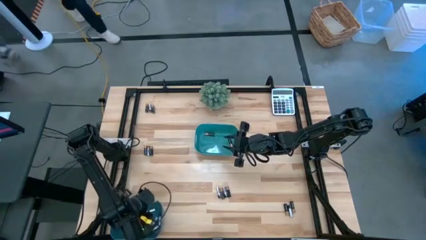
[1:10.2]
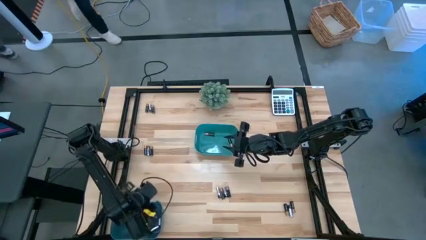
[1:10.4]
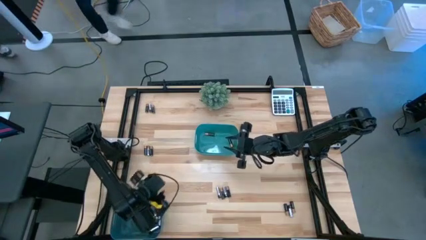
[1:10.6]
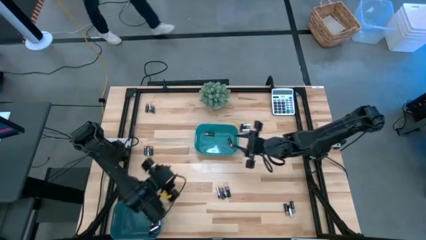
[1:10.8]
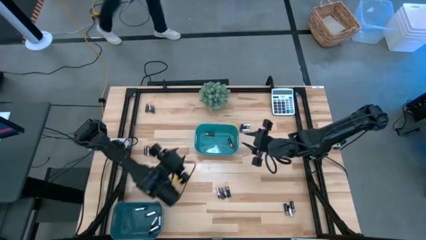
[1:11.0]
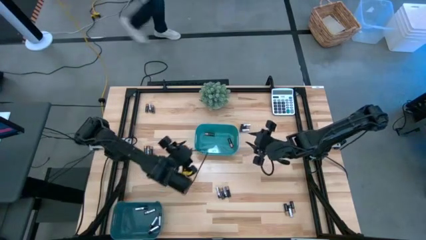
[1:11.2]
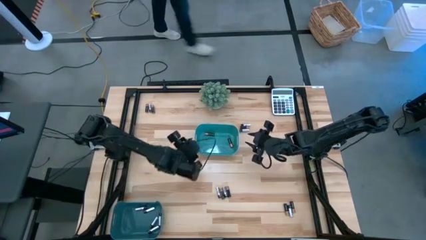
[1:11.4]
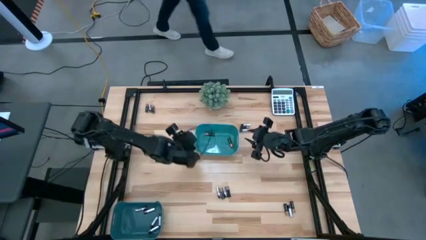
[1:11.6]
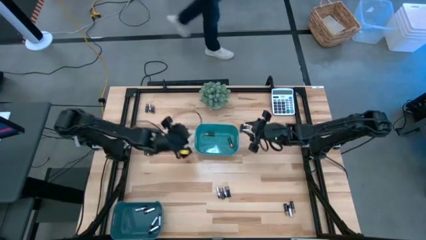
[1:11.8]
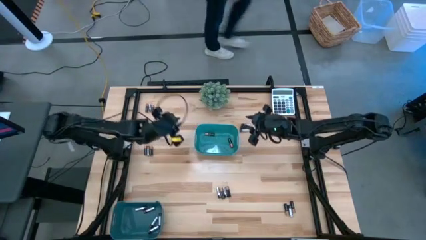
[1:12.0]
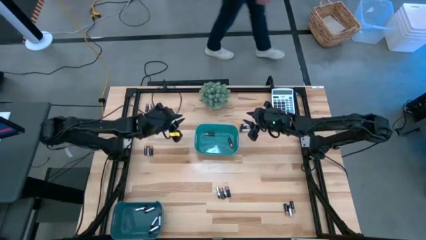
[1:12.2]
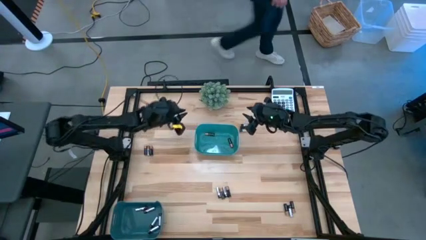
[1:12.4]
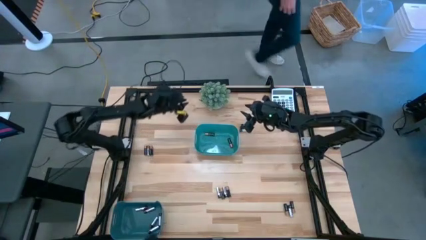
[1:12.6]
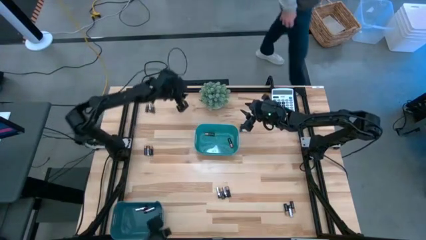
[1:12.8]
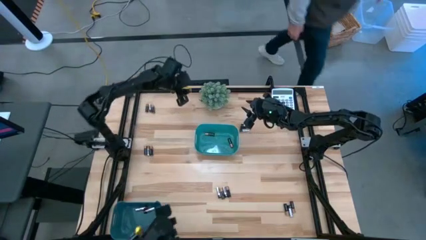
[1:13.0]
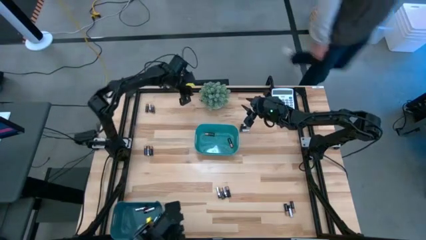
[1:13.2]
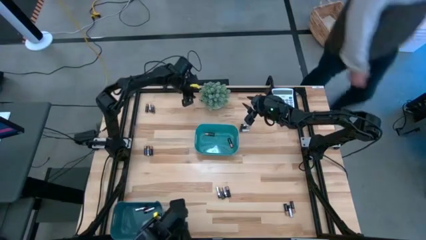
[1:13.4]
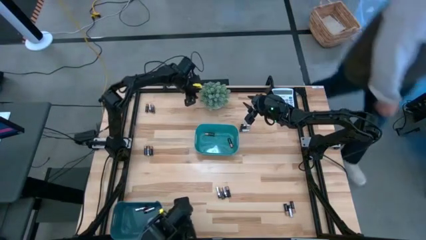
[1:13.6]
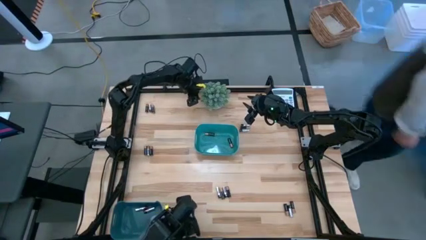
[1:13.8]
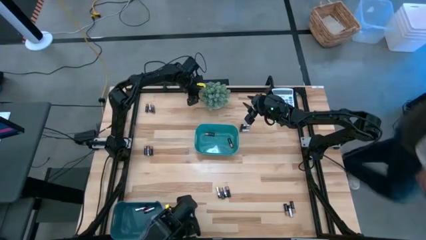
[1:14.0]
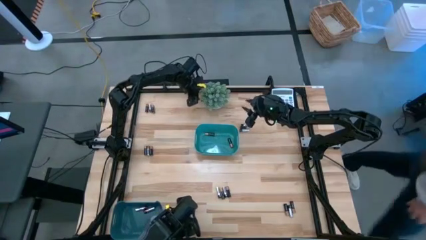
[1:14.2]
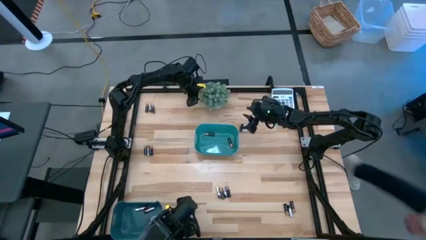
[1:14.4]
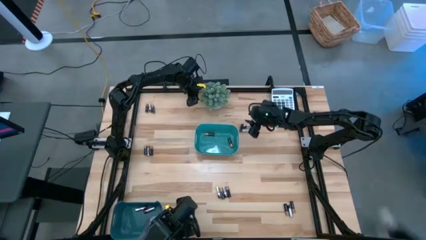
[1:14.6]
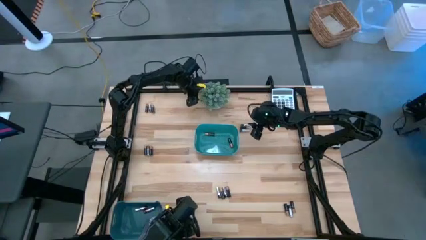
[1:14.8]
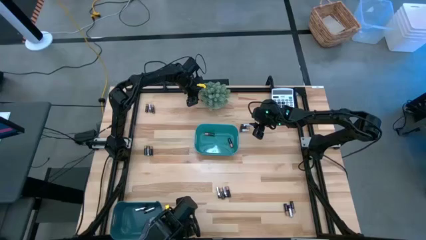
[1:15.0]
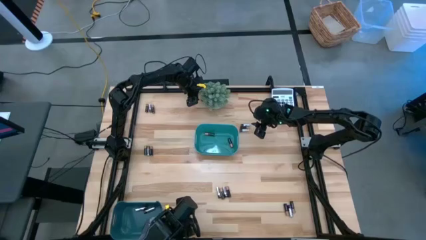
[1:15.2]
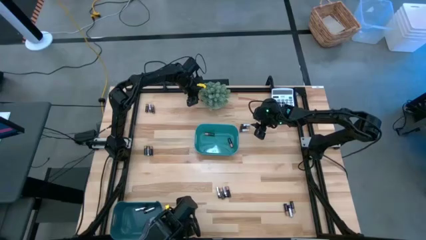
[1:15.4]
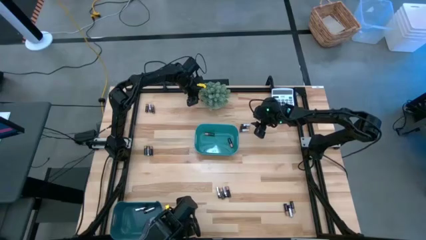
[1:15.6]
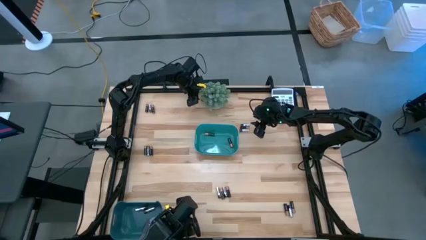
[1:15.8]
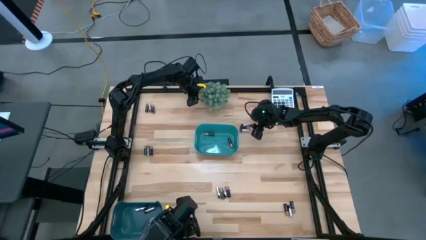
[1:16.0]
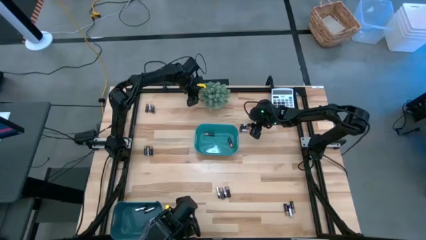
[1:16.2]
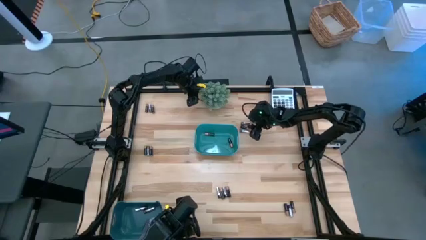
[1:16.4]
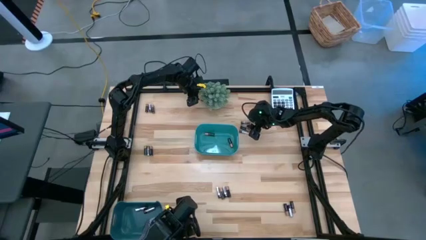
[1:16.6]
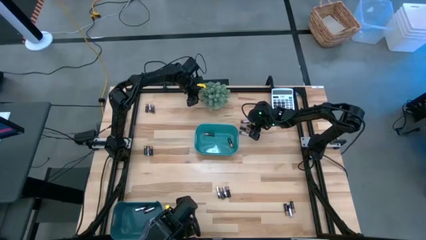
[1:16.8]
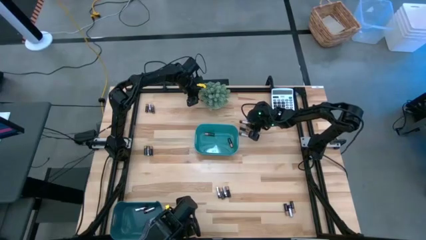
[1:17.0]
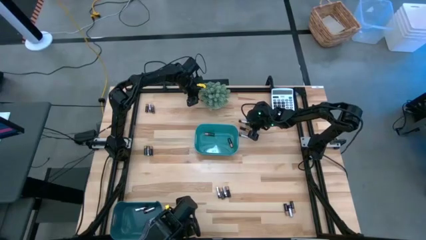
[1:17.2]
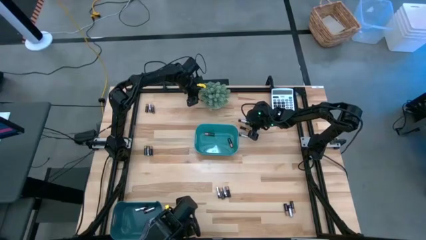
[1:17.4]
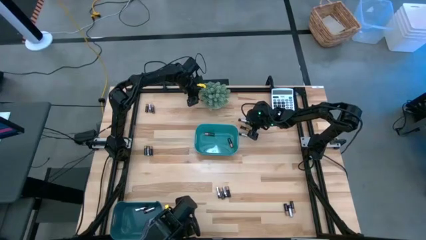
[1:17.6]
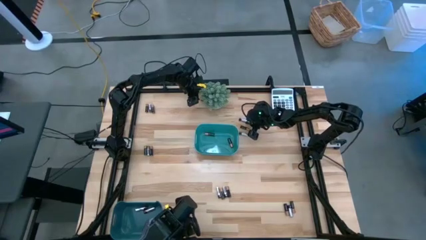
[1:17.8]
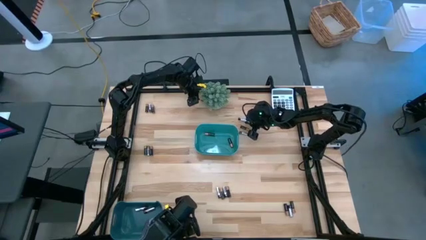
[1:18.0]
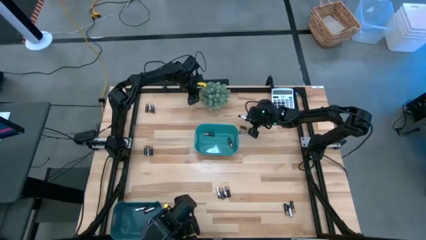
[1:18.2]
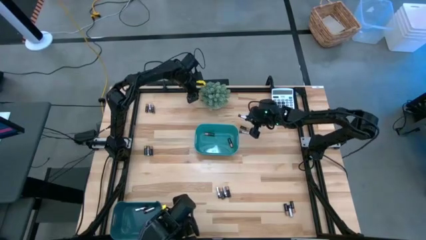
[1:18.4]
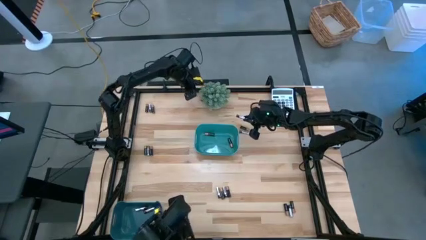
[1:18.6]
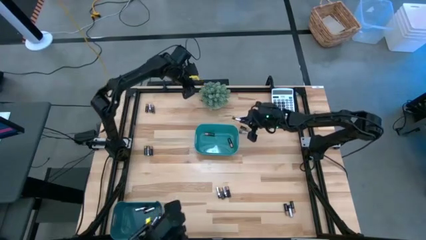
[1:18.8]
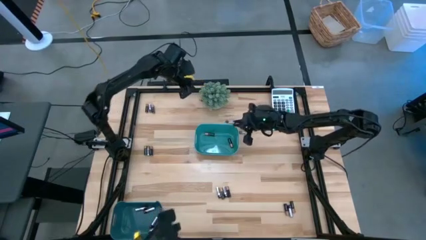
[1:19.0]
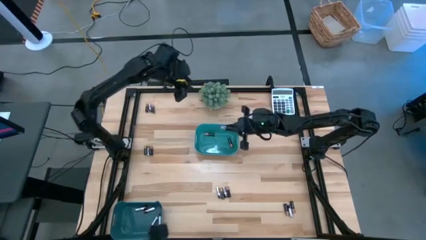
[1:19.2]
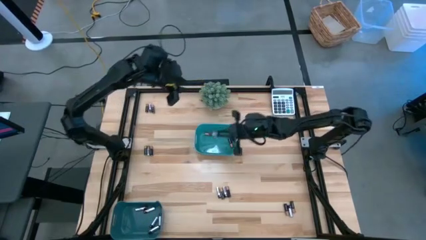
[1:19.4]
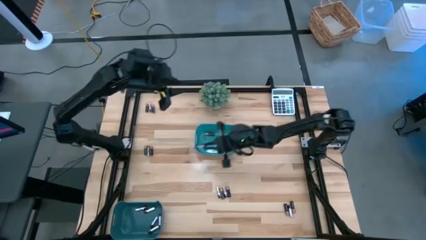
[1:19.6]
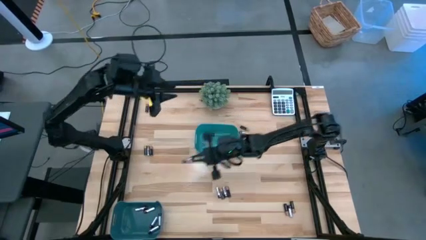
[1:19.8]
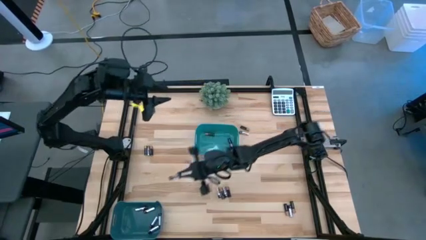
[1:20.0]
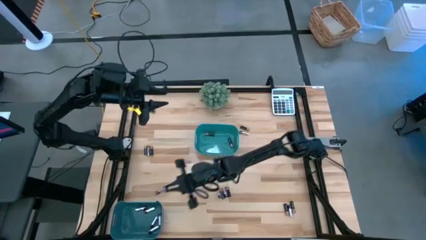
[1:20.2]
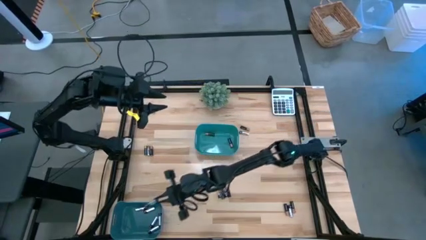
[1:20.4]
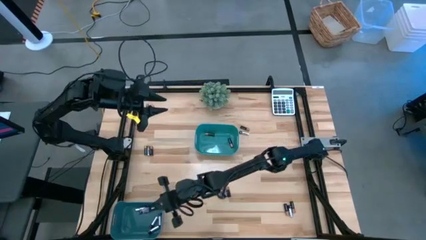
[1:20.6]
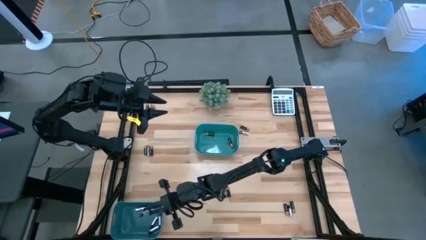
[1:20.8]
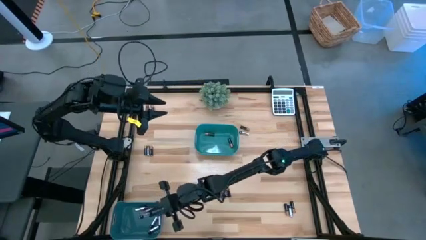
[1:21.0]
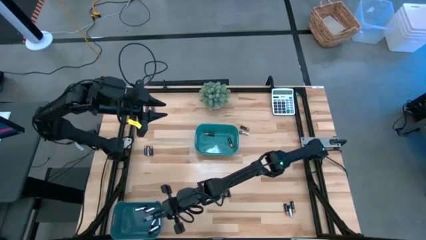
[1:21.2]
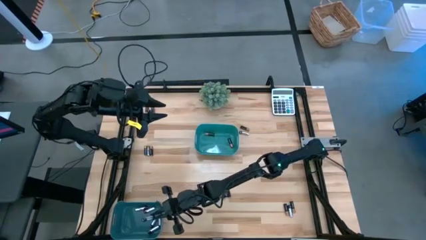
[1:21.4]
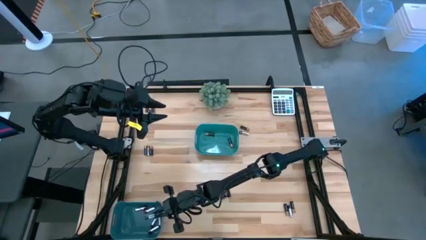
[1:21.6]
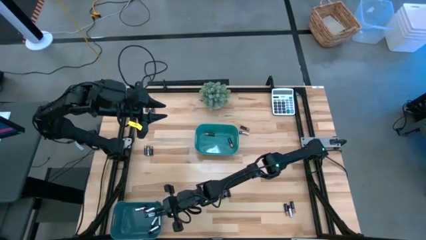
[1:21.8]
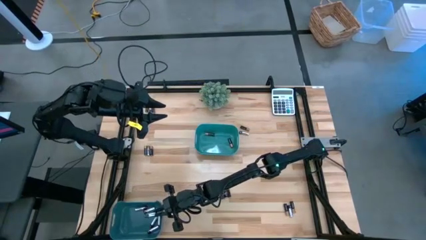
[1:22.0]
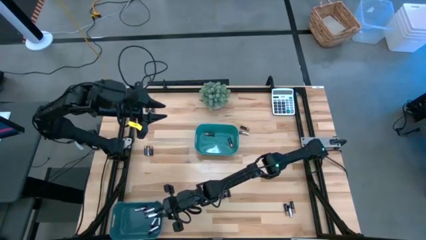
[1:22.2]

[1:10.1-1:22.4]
Task: Sort batteries
Put the silver battery into the blue bin
